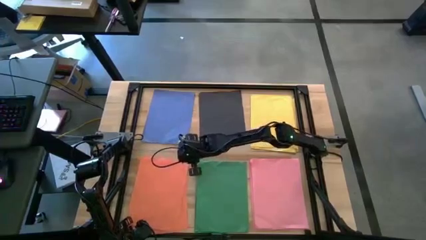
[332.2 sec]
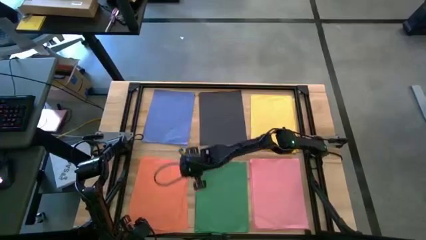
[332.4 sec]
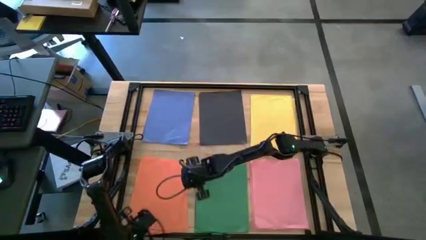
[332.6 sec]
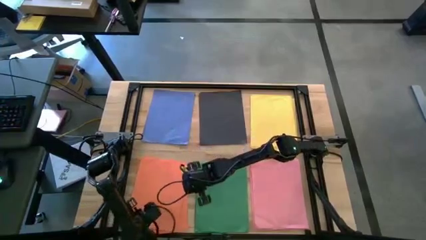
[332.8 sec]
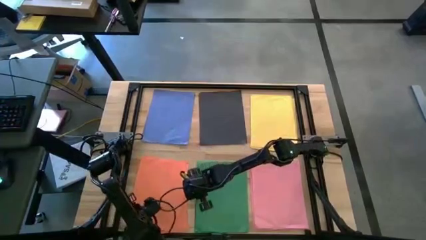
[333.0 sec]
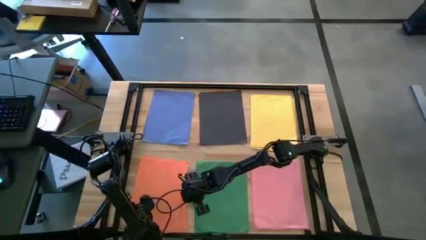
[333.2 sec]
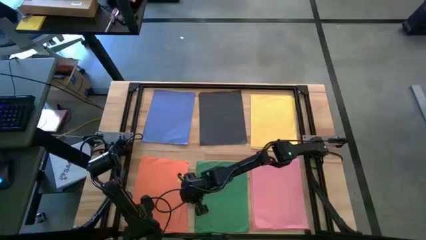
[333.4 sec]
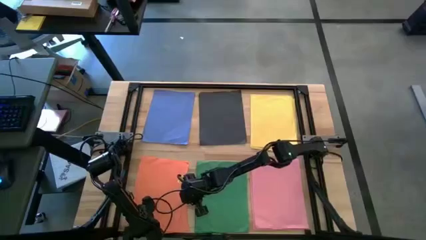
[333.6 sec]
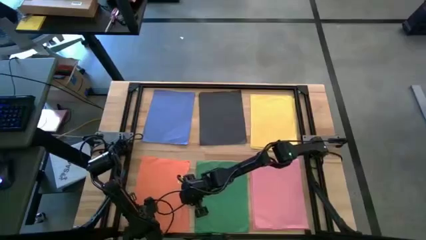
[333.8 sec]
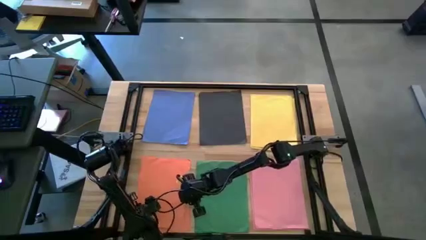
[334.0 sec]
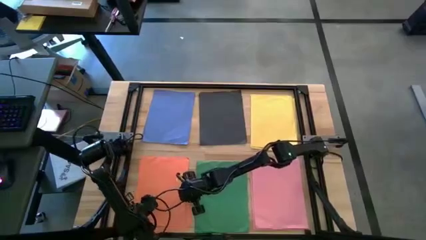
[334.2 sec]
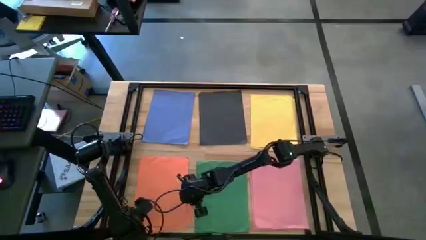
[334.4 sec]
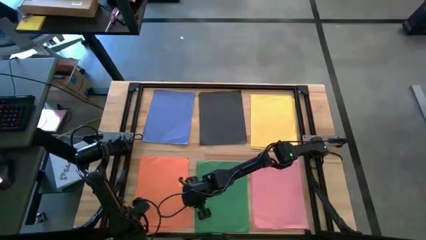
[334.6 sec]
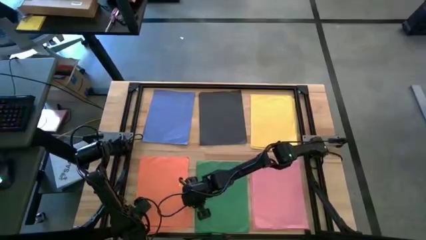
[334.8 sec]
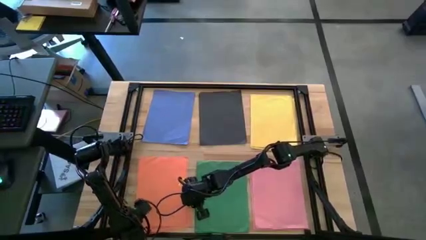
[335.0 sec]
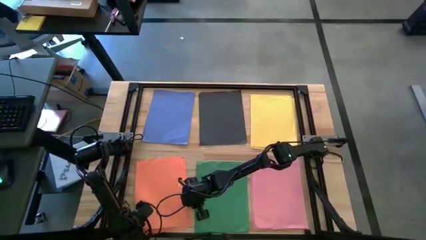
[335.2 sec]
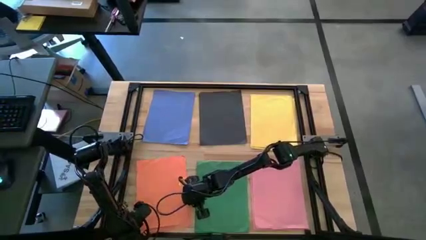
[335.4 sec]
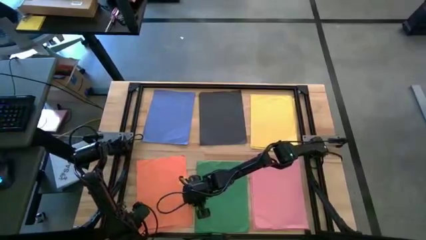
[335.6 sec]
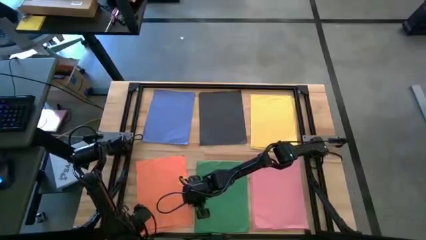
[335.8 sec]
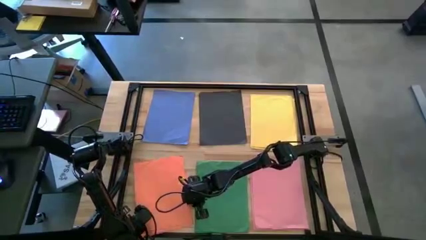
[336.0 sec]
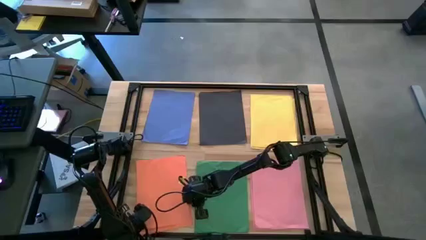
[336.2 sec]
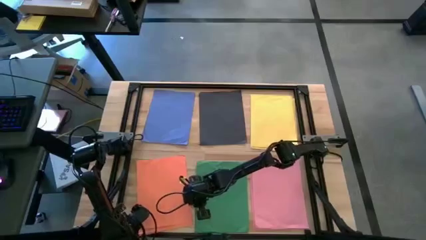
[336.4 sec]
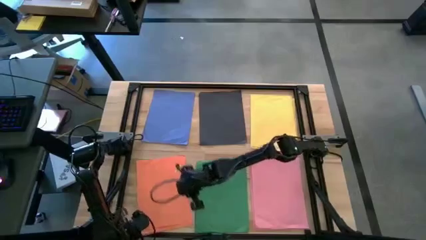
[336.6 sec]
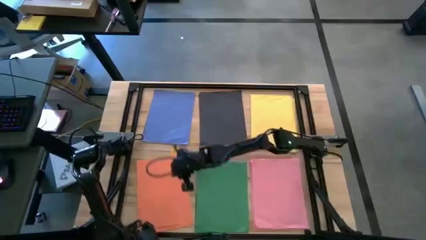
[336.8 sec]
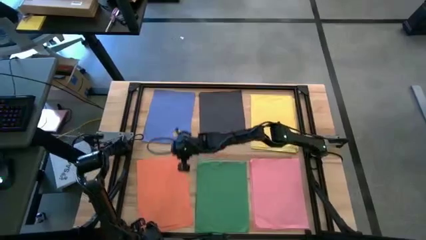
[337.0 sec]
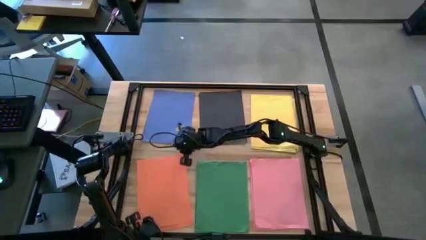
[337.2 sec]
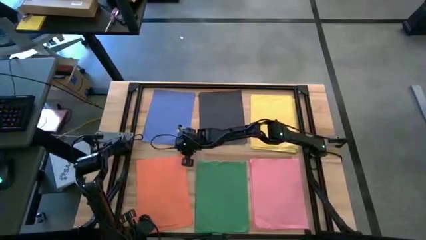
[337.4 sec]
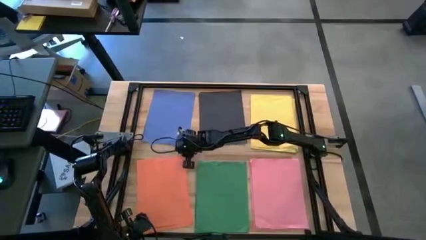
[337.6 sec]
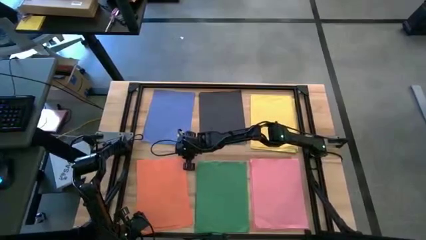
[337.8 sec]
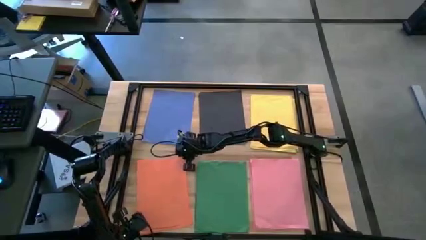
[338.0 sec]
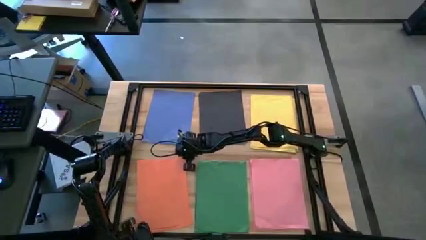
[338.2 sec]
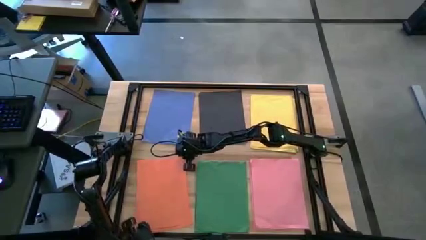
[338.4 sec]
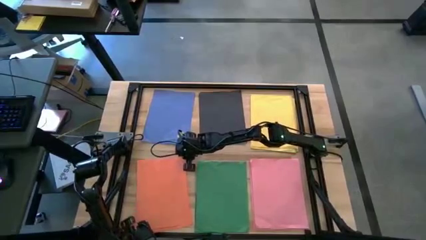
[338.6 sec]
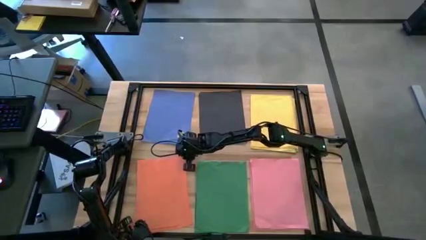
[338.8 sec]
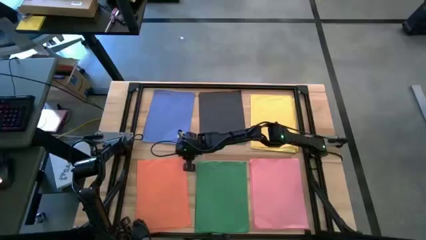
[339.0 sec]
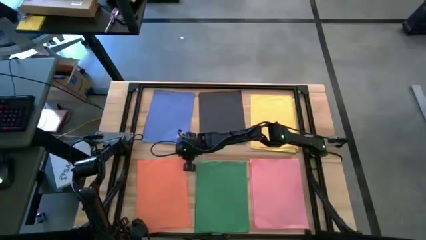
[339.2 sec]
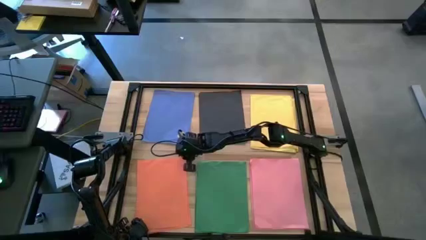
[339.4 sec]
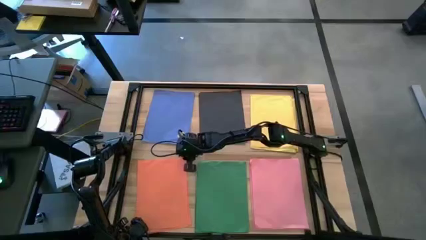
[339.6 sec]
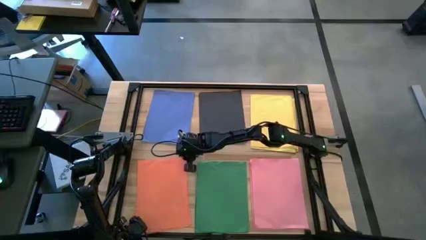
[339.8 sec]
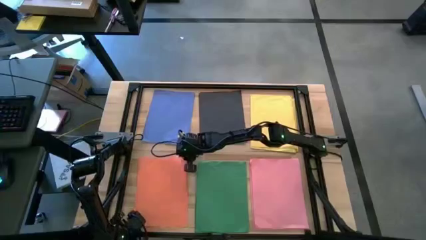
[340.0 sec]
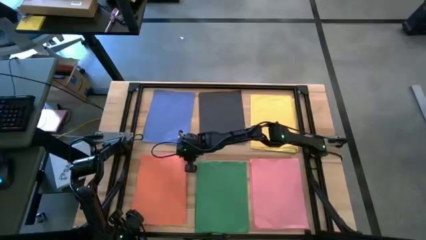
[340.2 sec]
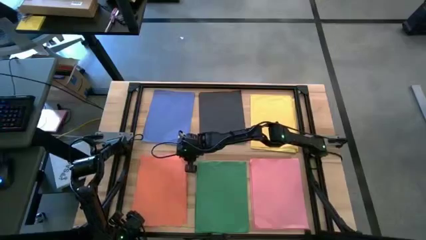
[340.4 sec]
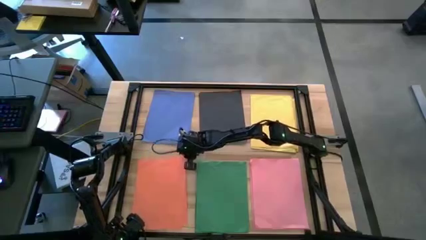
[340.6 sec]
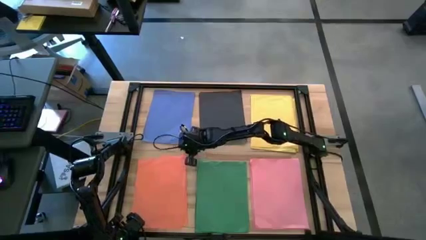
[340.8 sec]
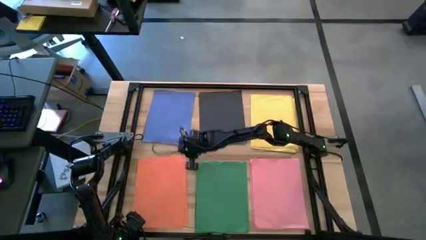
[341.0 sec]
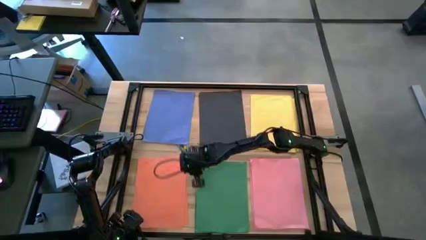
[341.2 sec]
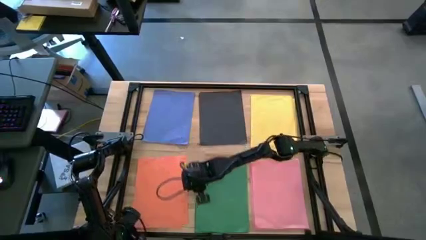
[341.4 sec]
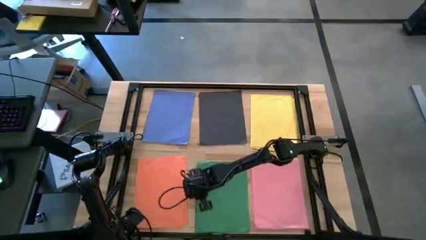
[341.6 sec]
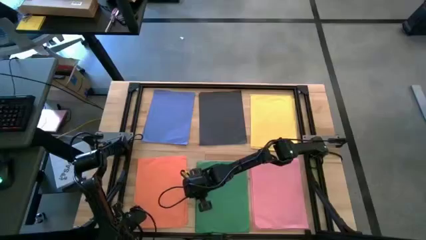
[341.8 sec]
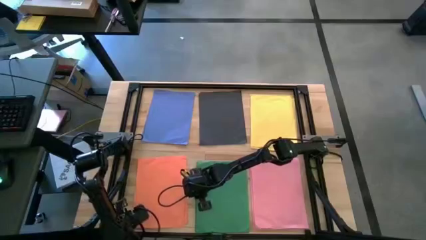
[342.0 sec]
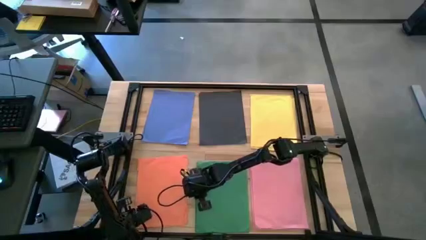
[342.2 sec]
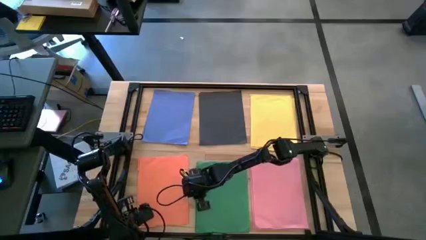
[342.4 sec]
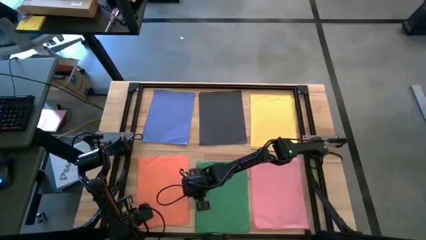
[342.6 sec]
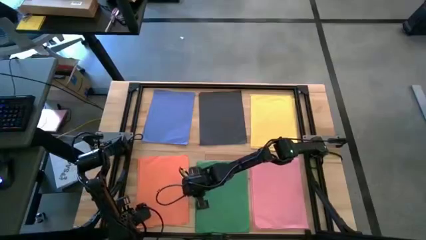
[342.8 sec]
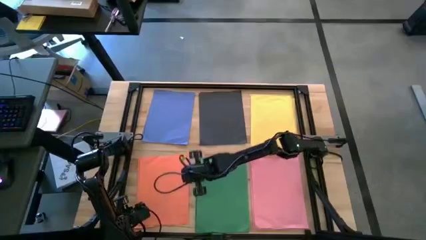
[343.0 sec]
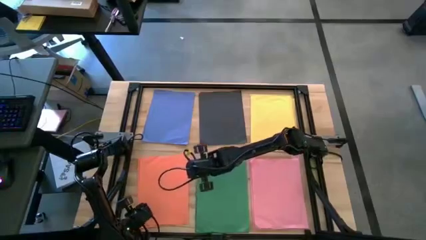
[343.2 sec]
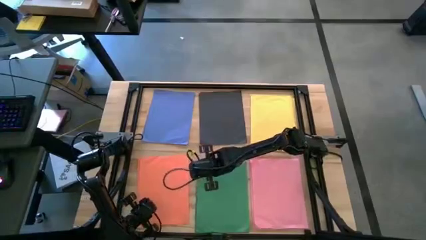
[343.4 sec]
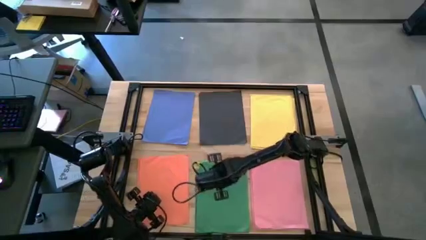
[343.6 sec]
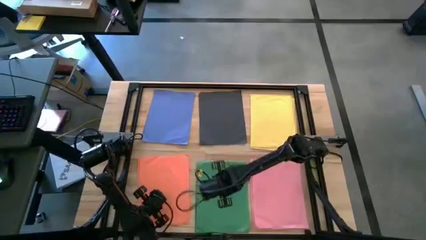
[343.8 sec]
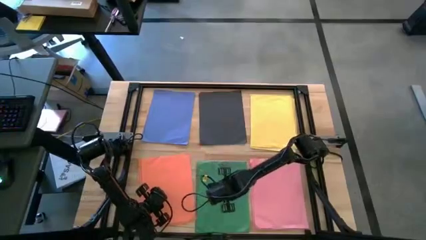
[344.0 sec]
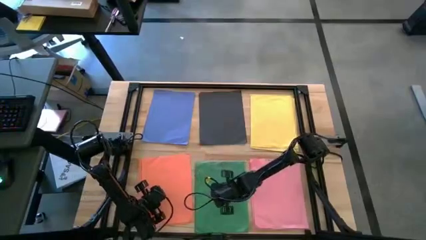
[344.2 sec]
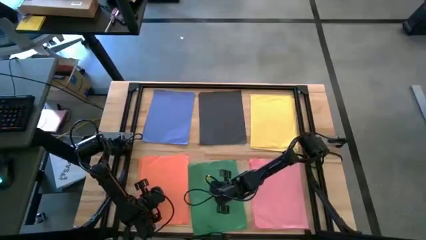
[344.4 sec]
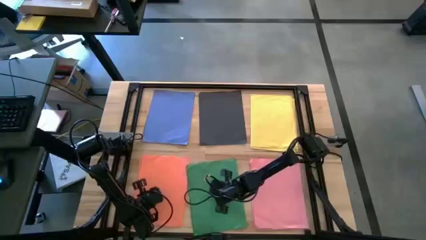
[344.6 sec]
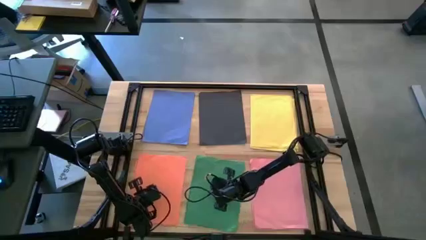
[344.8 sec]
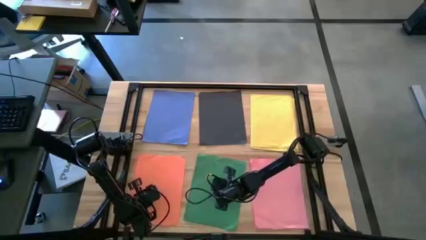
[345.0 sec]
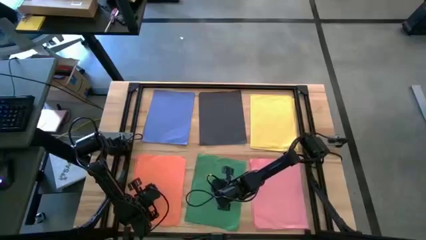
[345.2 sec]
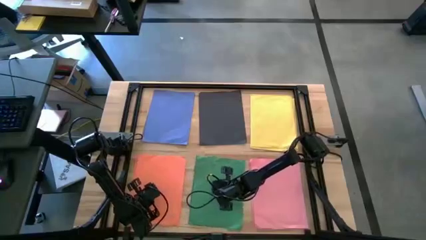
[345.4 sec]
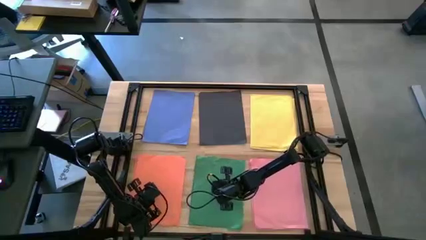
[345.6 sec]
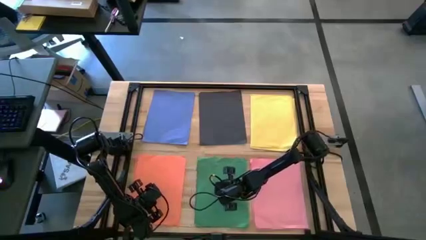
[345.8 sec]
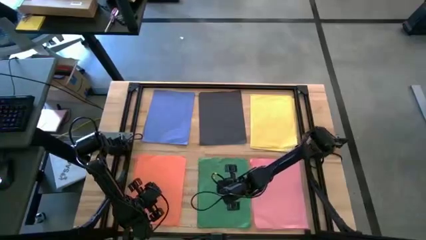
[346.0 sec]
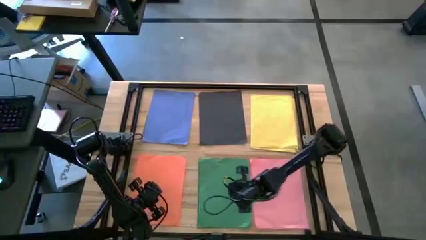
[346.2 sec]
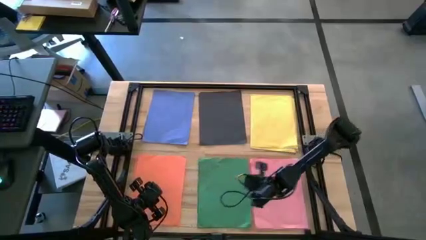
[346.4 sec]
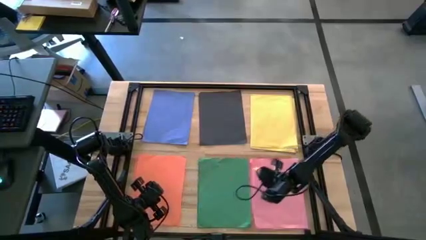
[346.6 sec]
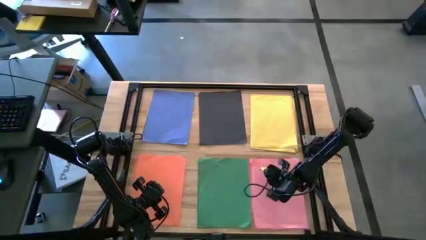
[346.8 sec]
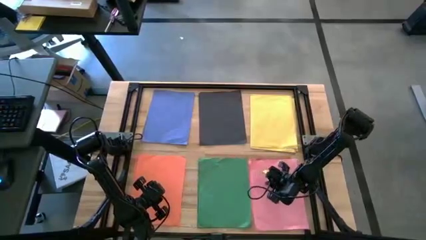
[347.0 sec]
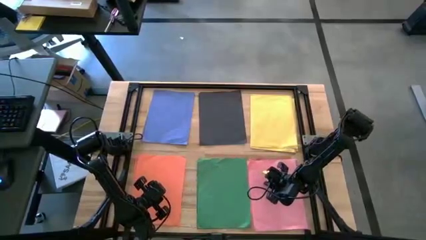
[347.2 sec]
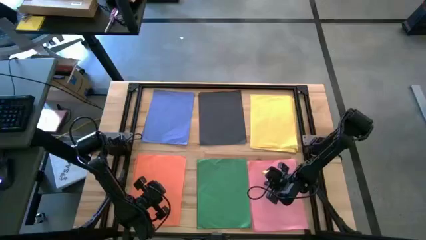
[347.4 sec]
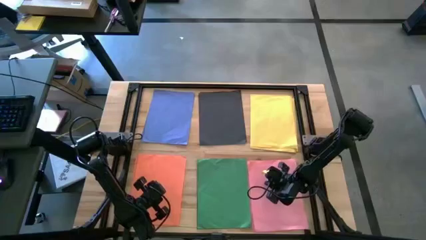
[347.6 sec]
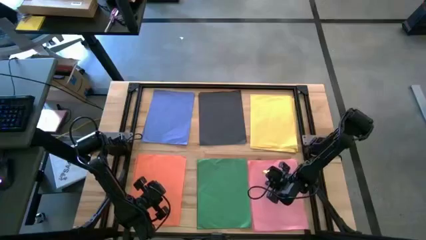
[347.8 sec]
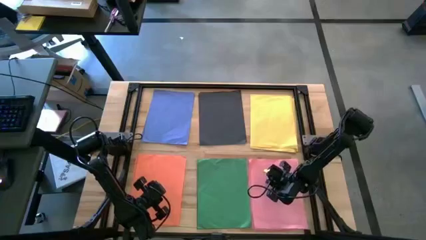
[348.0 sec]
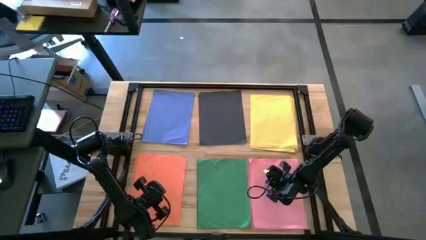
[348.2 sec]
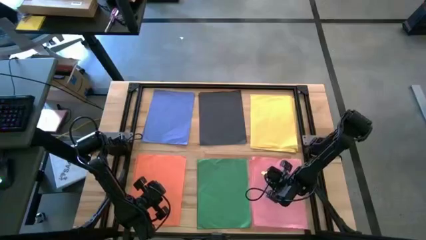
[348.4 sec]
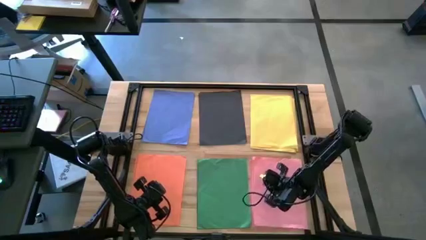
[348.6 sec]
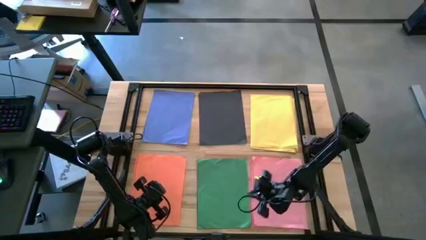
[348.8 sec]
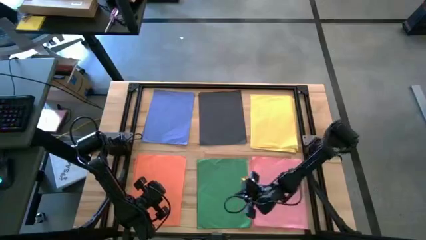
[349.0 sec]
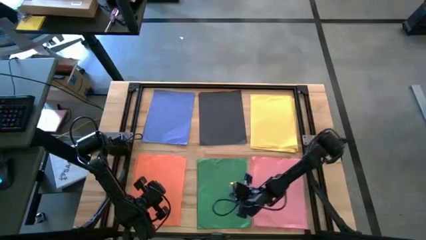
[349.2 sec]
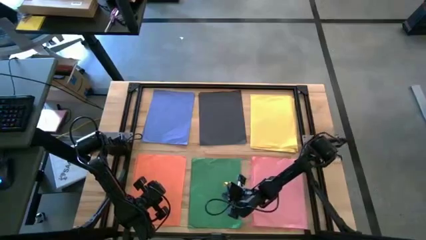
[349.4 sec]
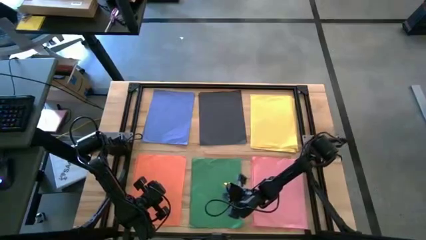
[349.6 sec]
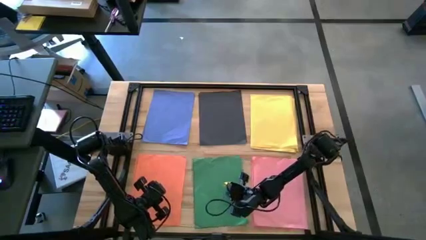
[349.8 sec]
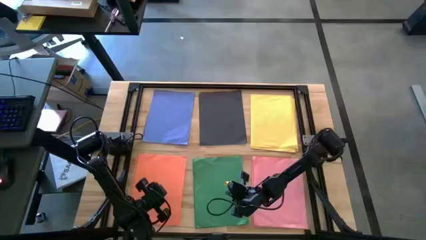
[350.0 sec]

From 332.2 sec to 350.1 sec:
Task: Organize paper
Adjust the orange, green, and pink papers
